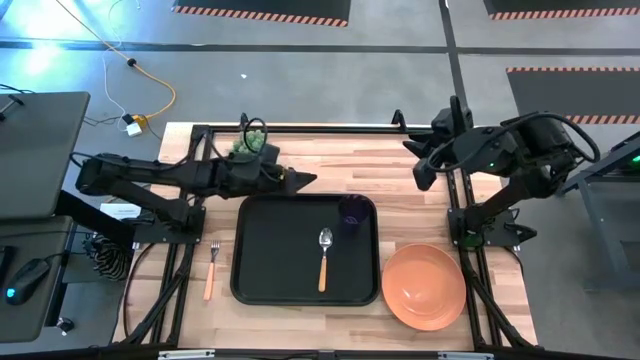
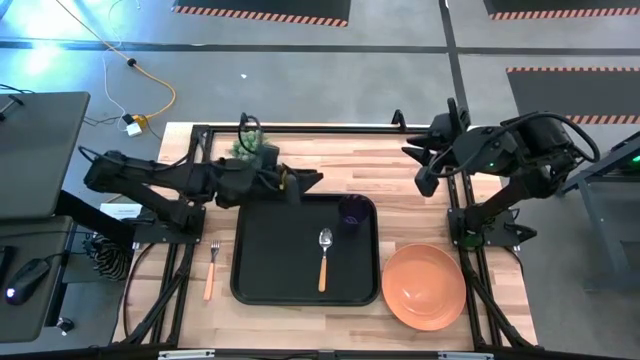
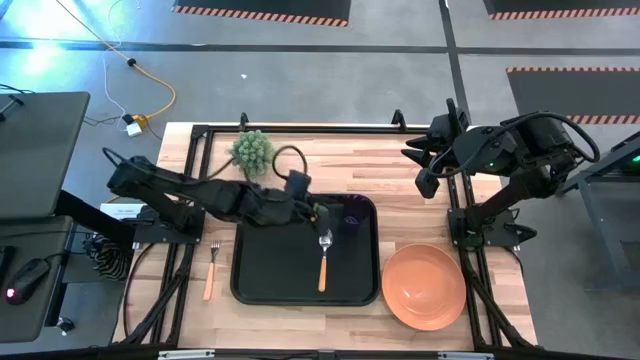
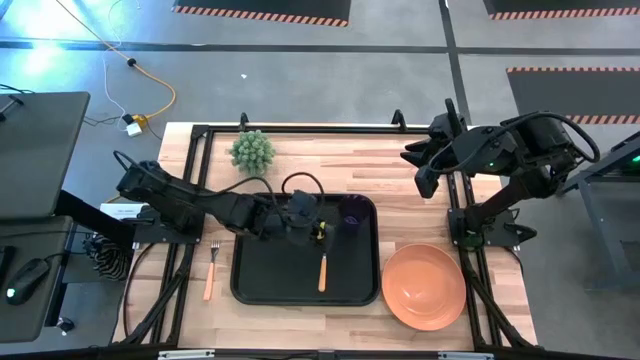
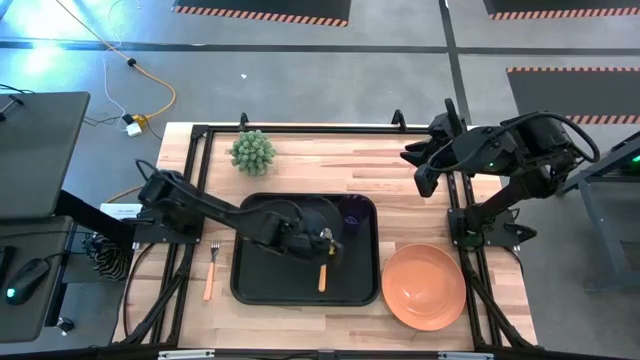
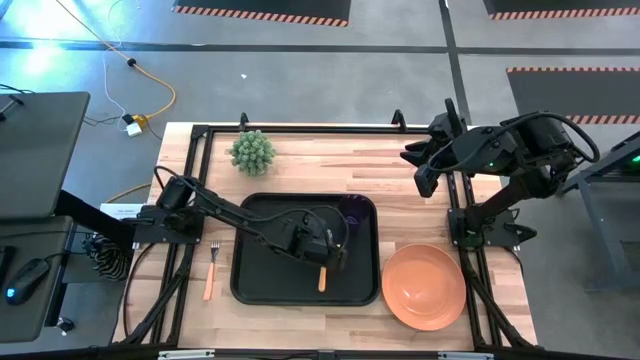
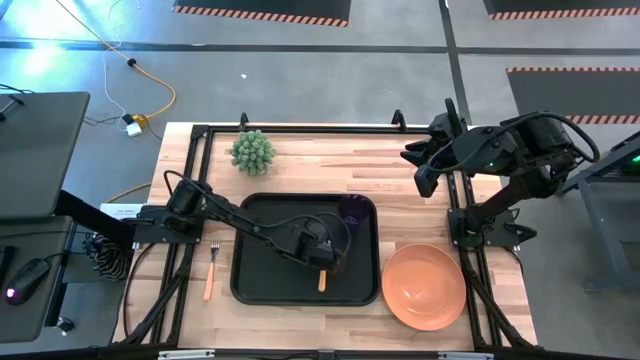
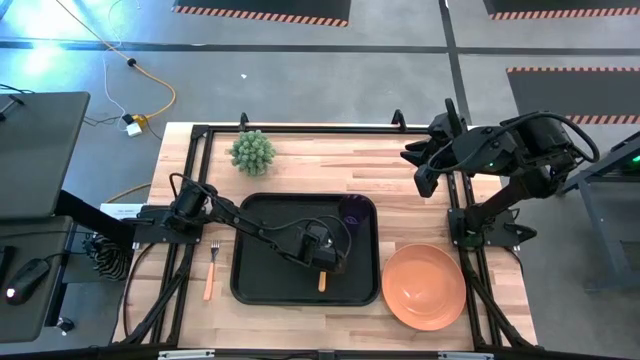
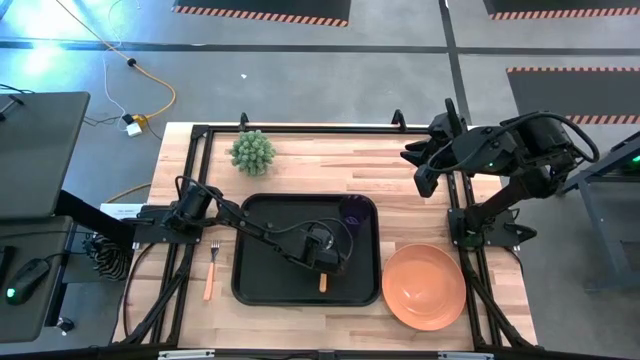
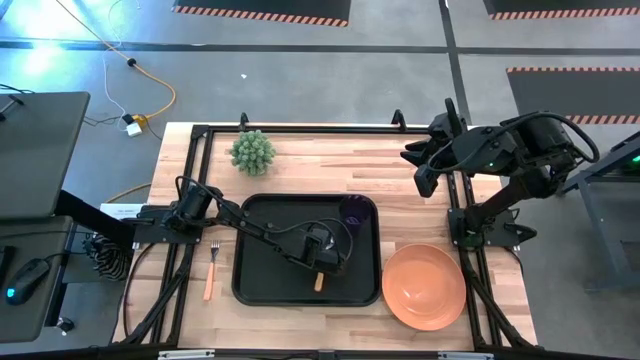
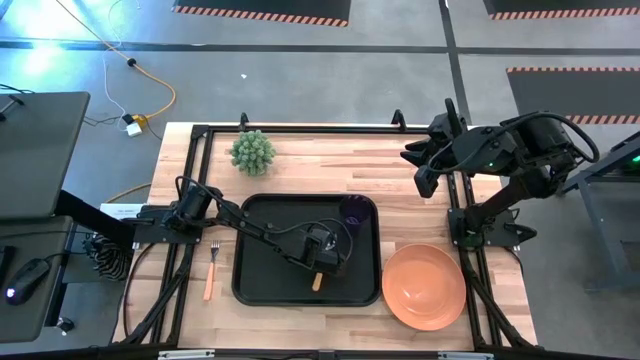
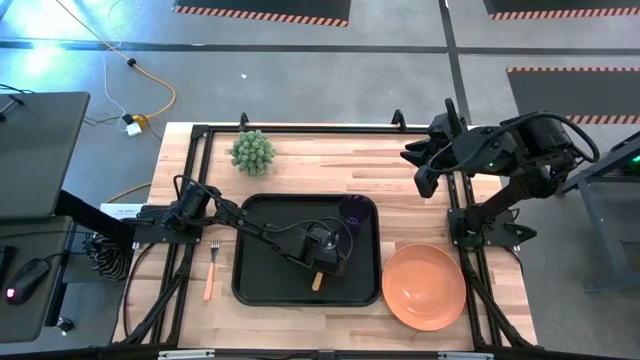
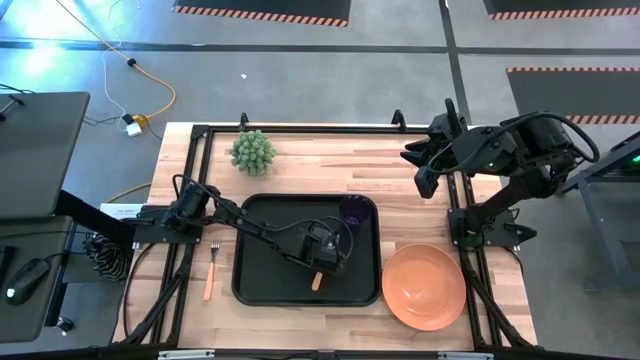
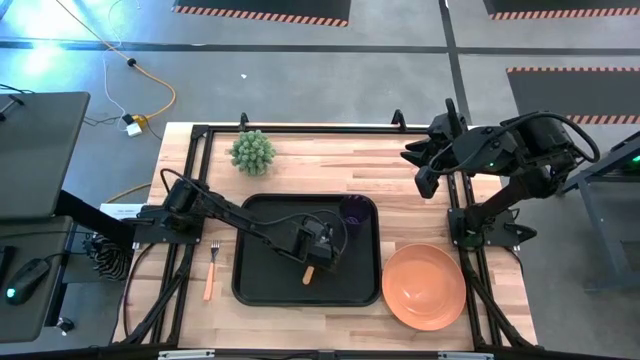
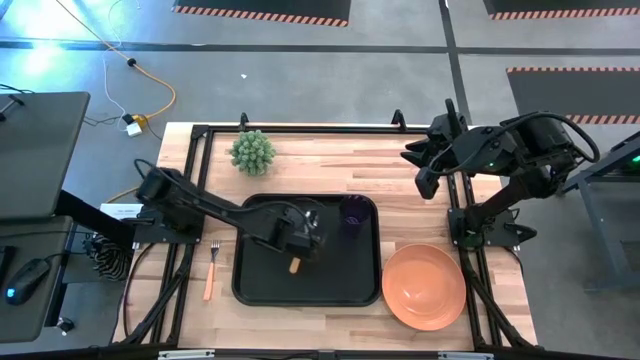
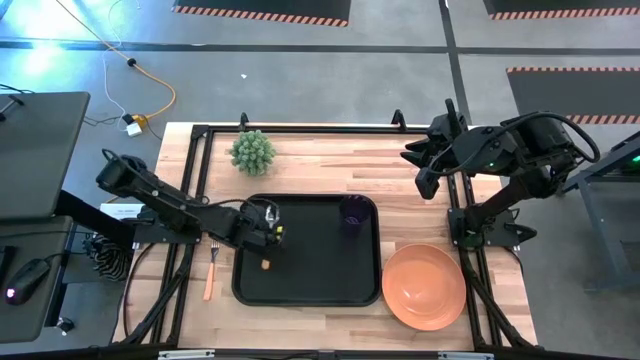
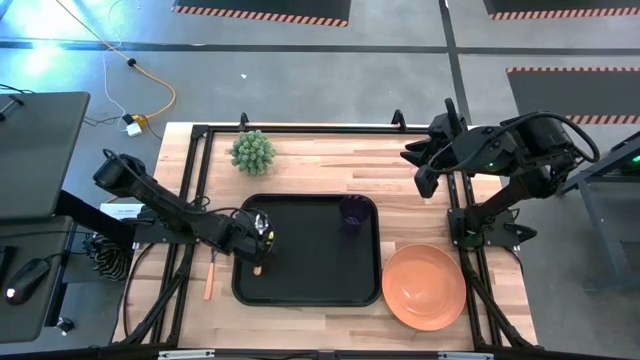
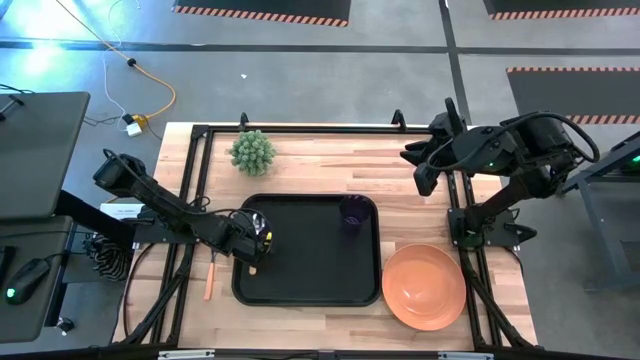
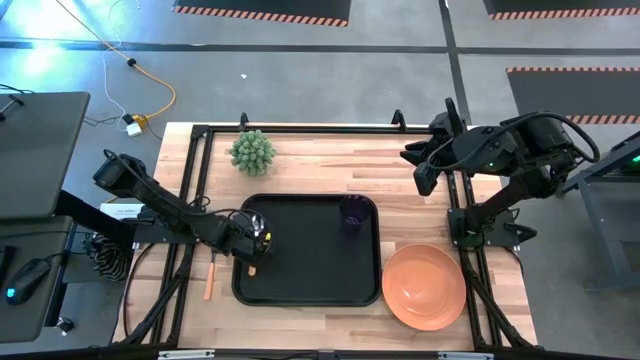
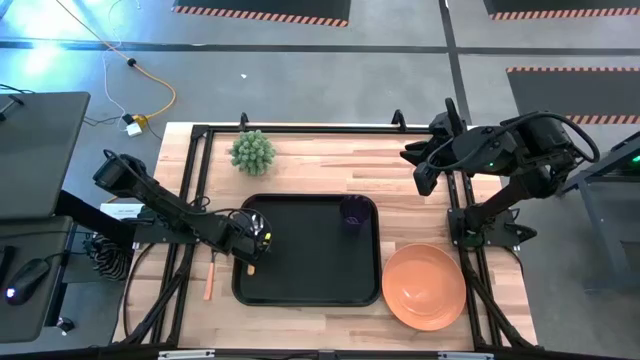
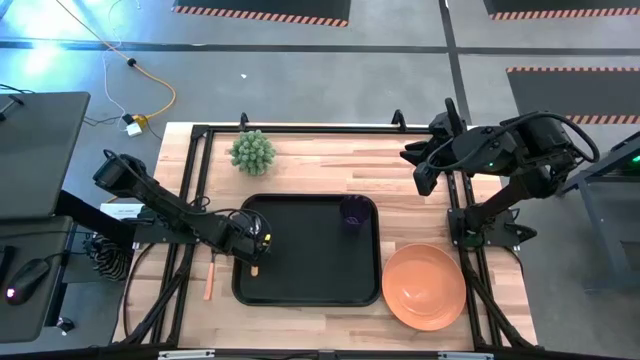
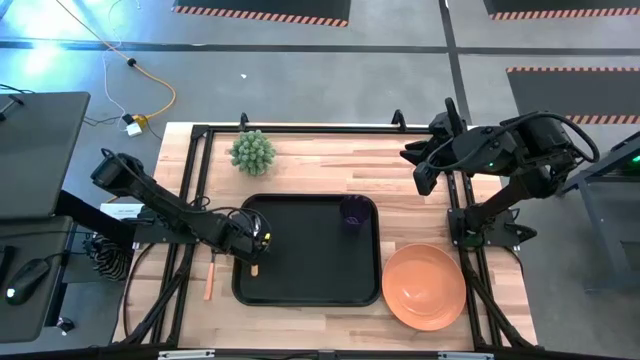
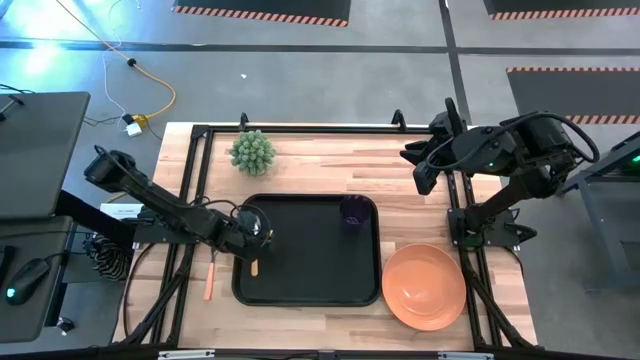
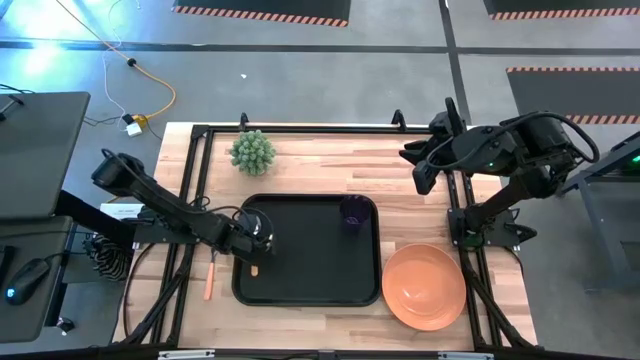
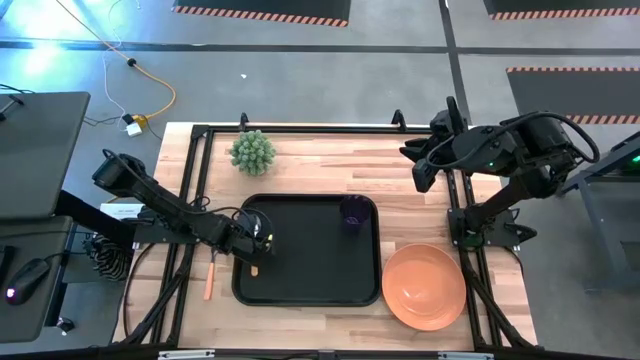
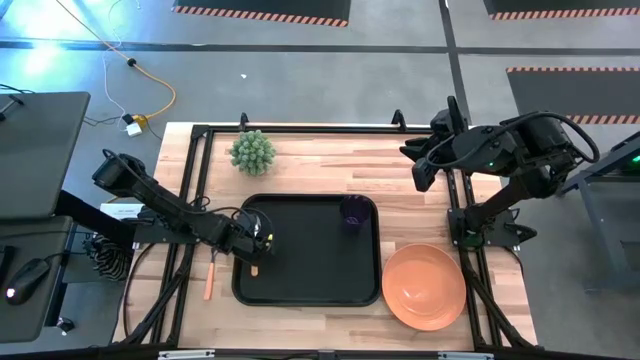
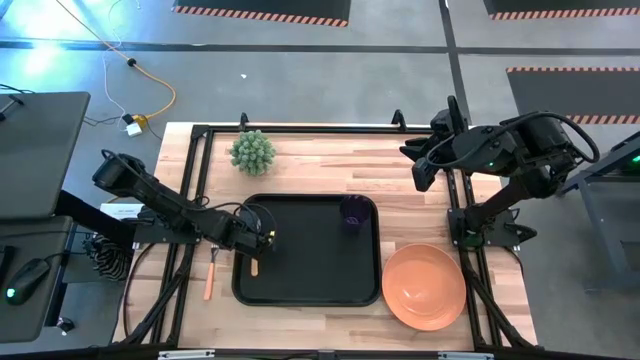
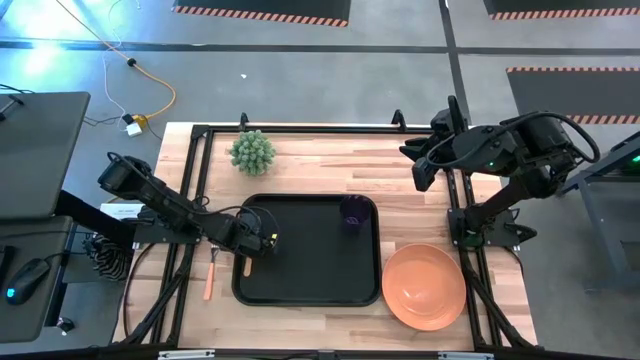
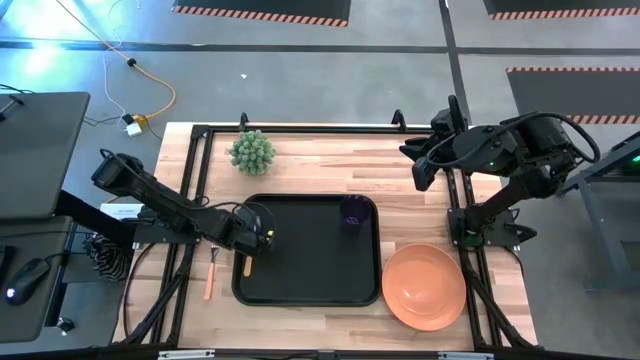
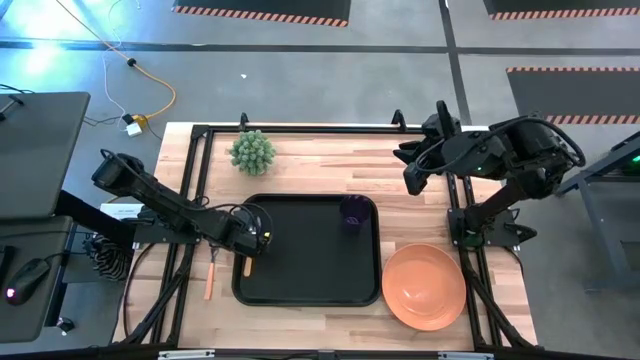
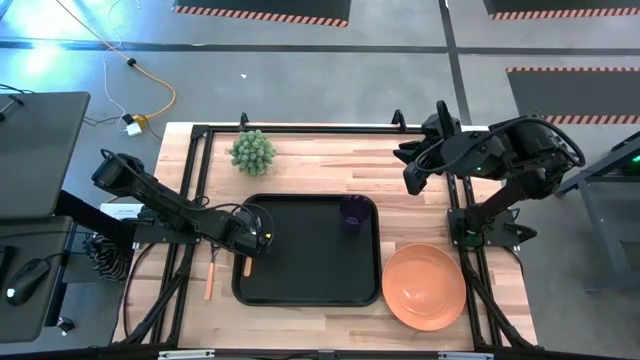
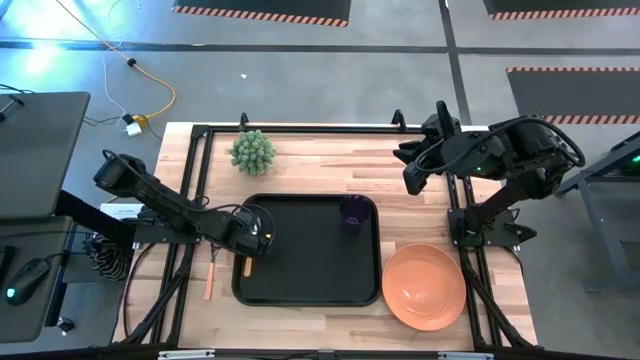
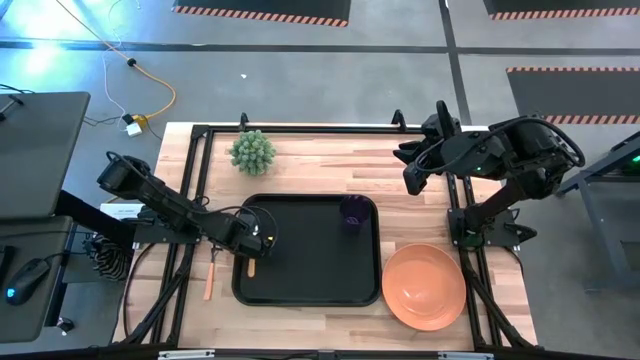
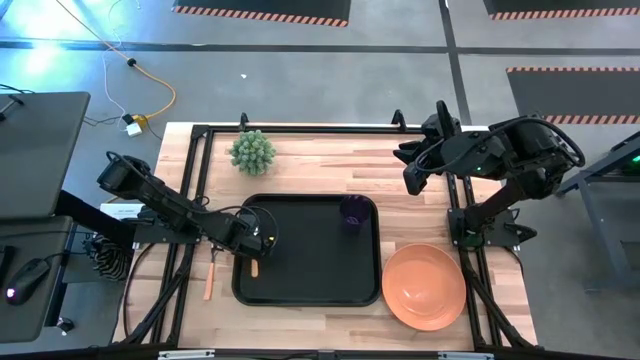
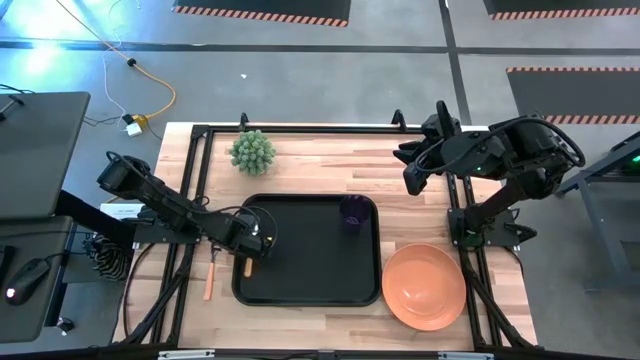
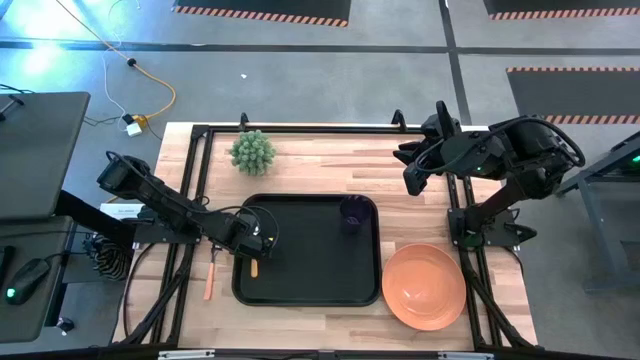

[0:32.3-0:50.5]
Task: Pick and place plate/cup/fork/spoon on tray
Put the orange yellow on the left side of the black tray

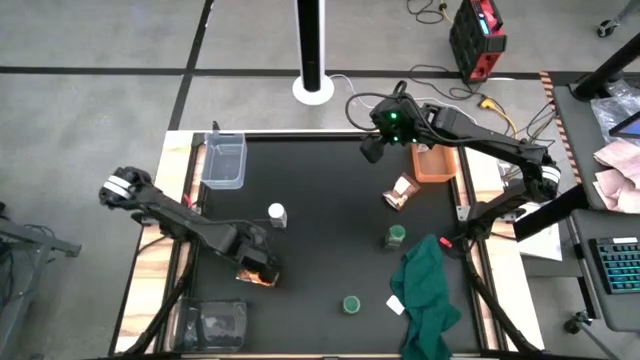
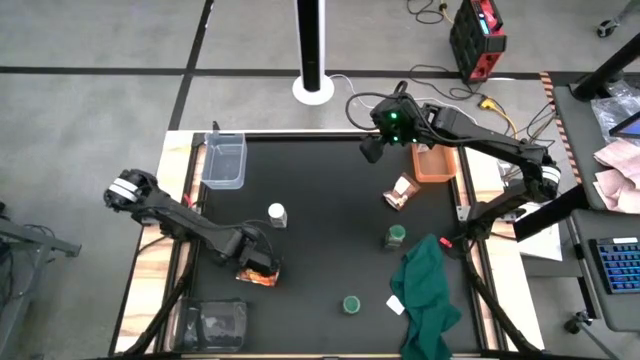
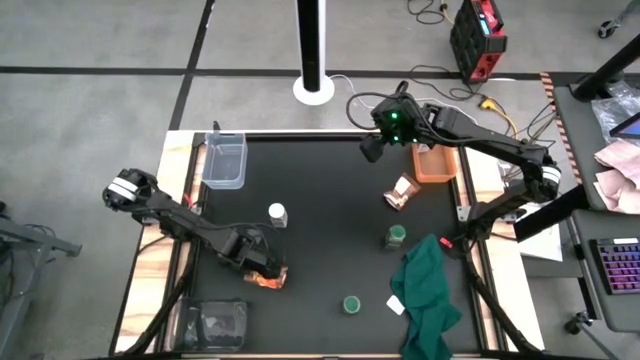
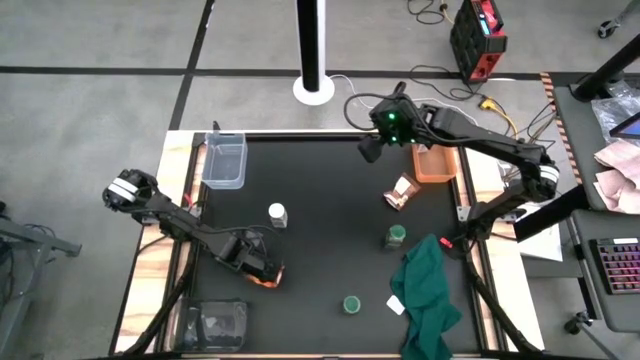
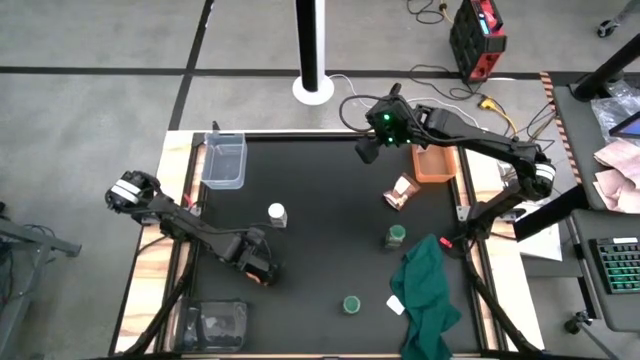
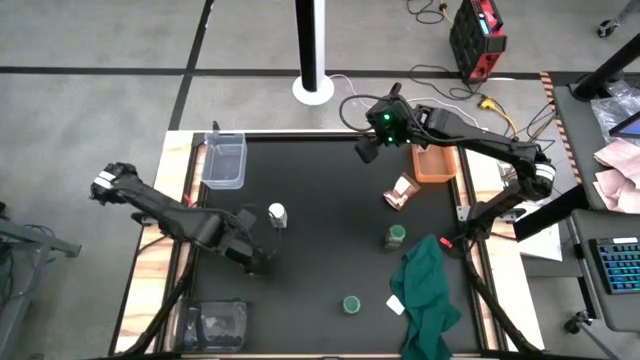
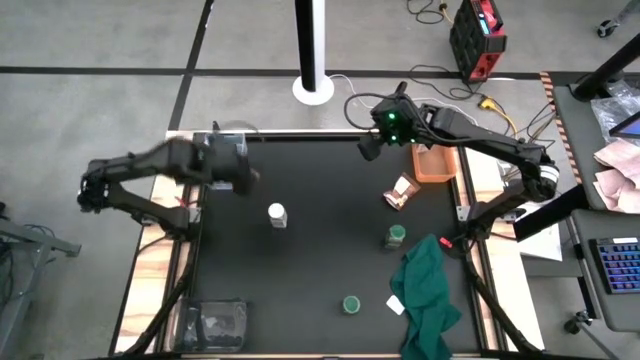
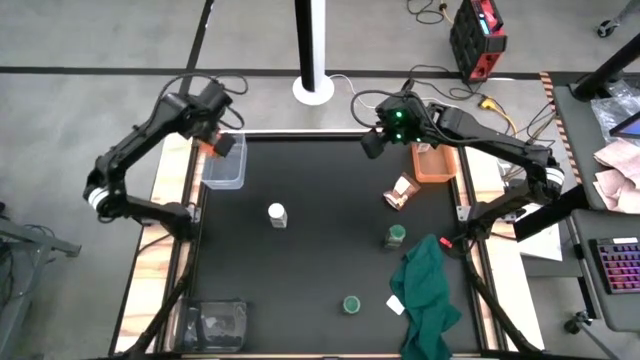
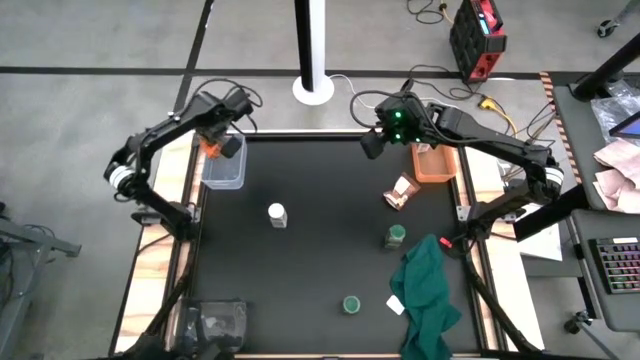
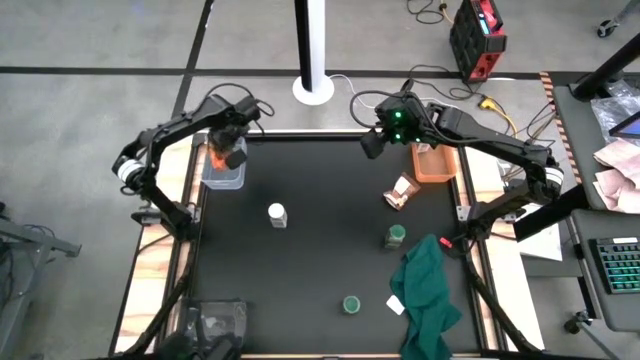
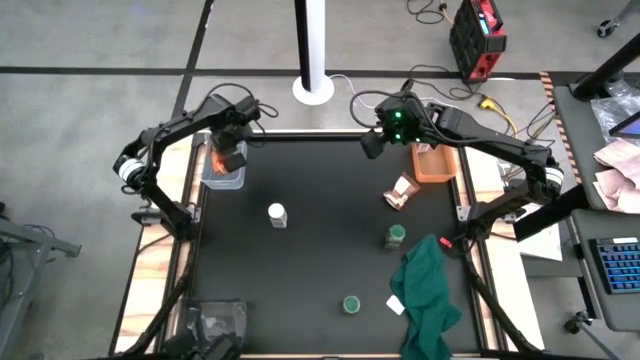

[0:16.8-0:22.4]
Task: Sort spices by type
Put the bottom orange seasoning pack into the transparent bin
